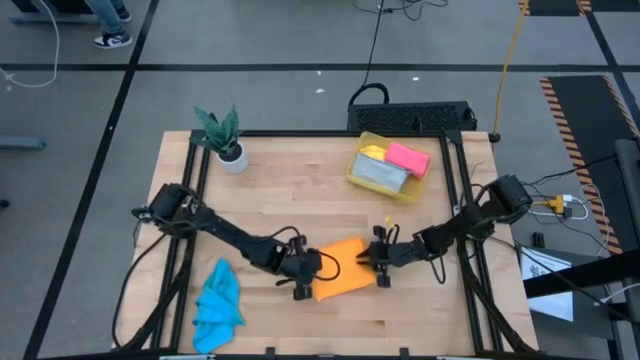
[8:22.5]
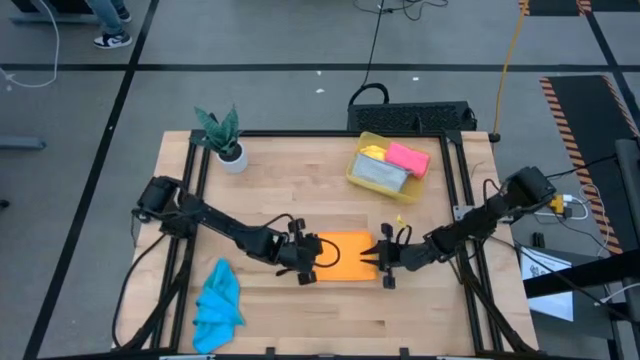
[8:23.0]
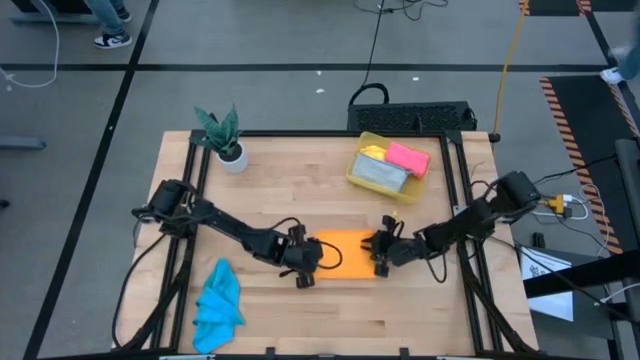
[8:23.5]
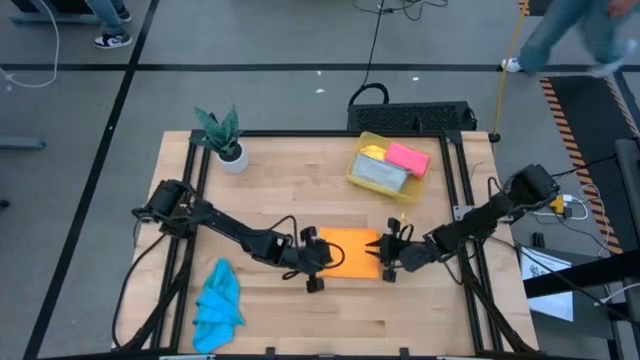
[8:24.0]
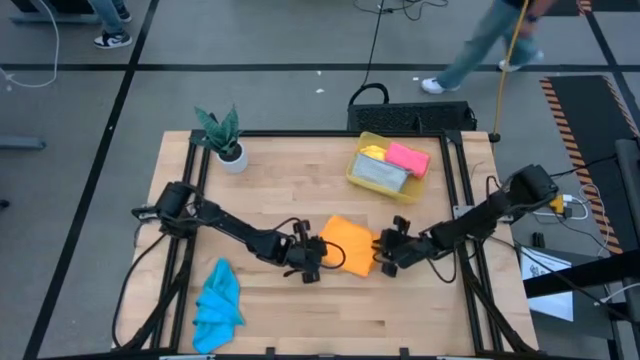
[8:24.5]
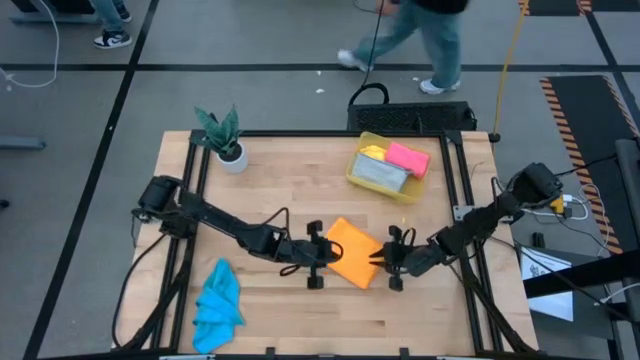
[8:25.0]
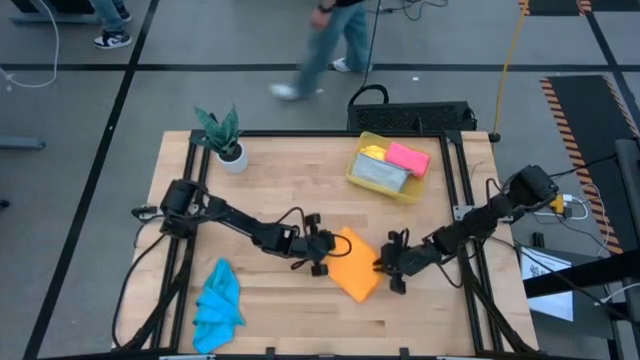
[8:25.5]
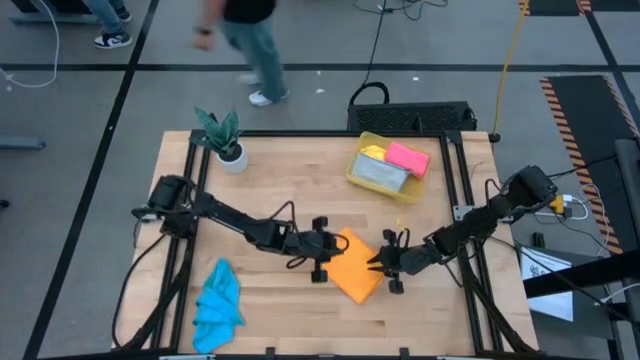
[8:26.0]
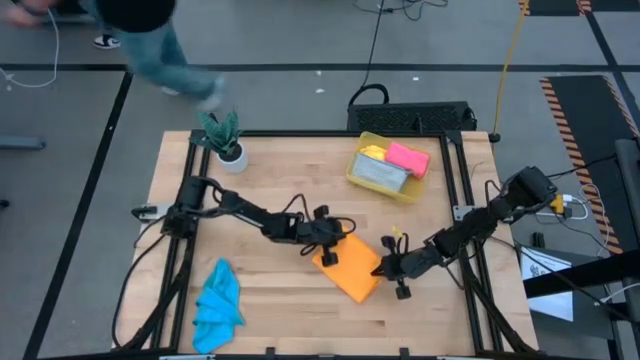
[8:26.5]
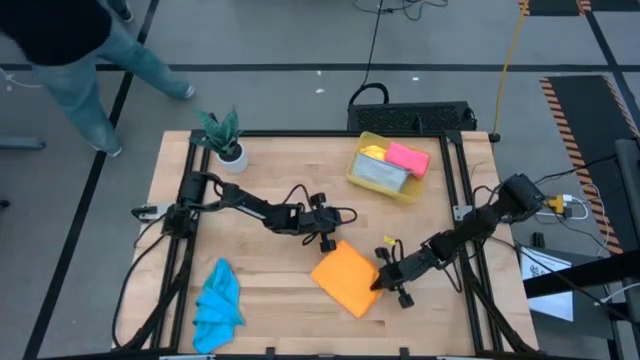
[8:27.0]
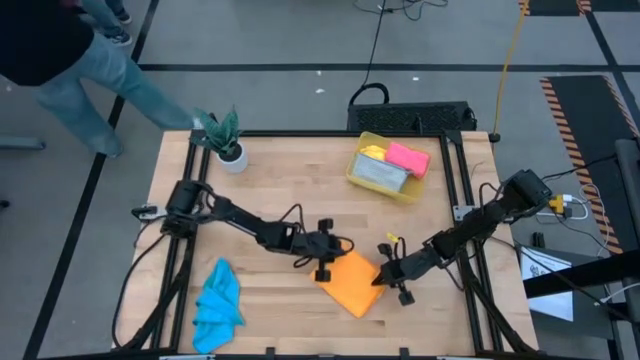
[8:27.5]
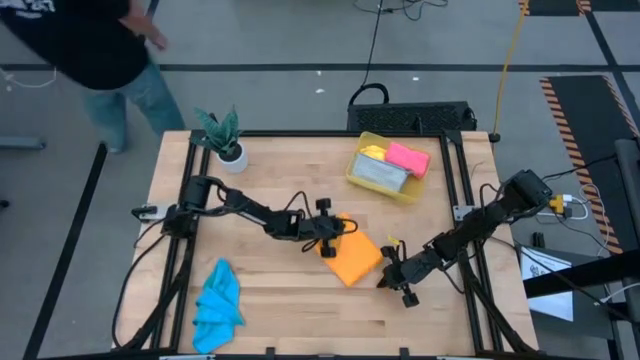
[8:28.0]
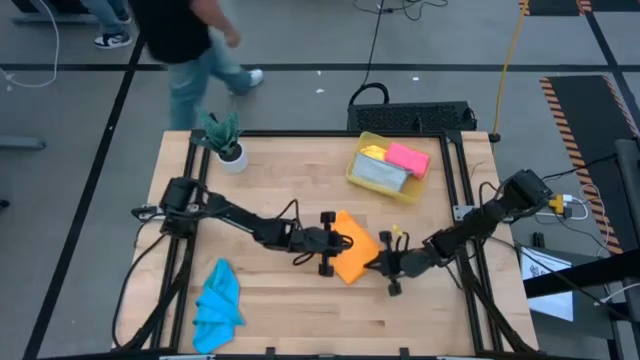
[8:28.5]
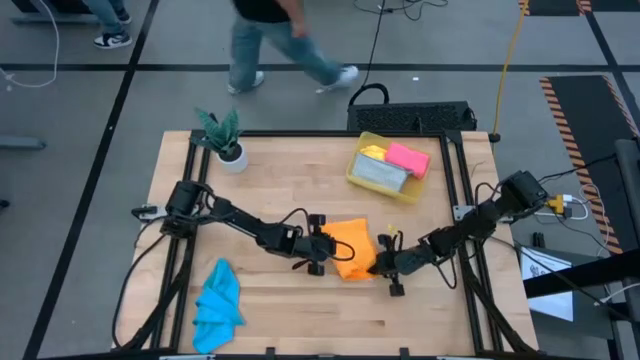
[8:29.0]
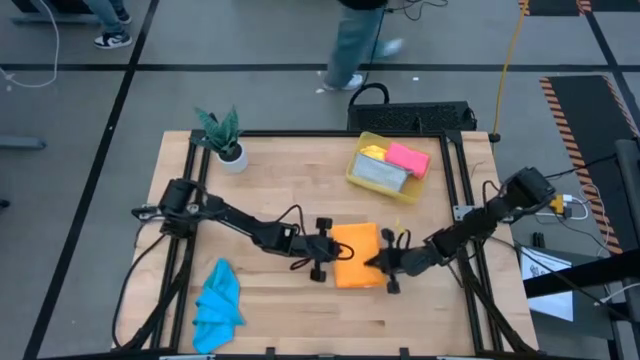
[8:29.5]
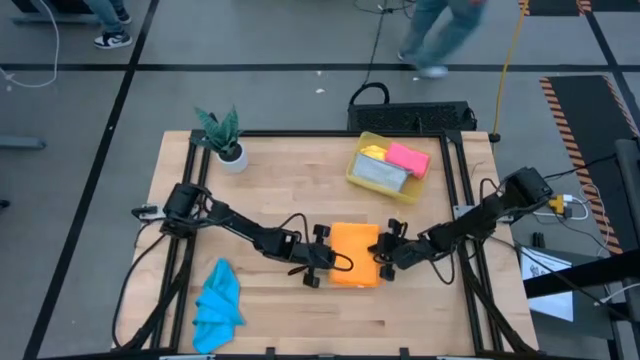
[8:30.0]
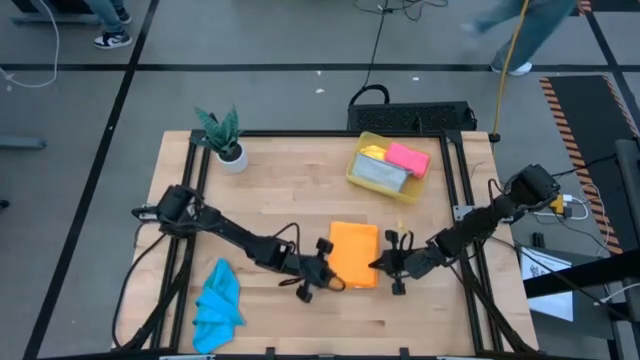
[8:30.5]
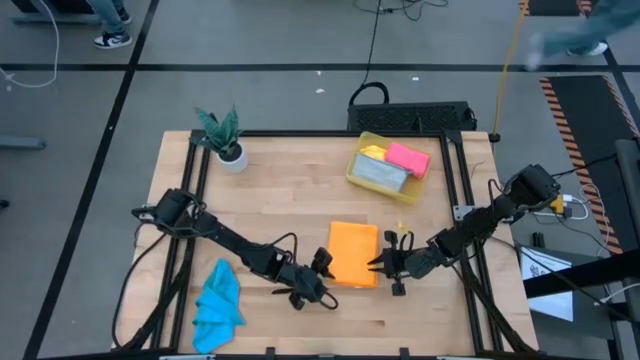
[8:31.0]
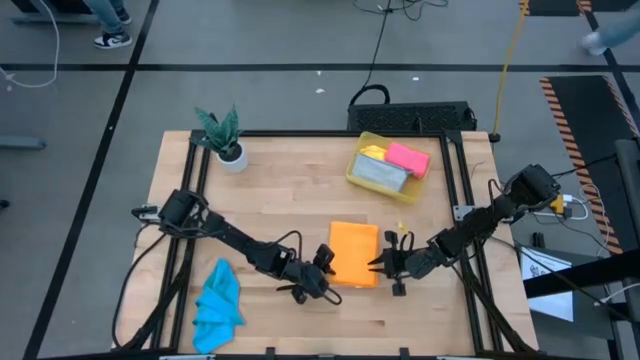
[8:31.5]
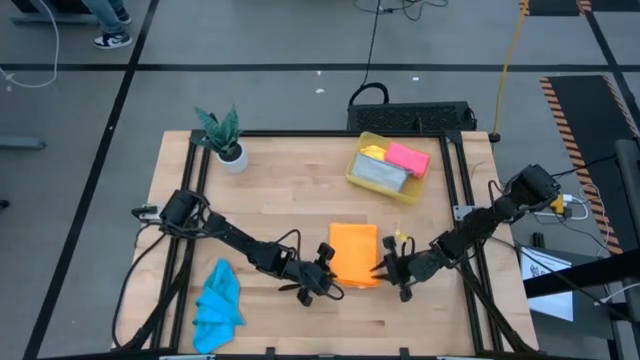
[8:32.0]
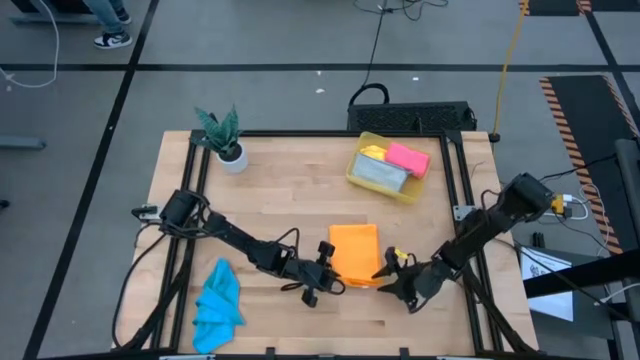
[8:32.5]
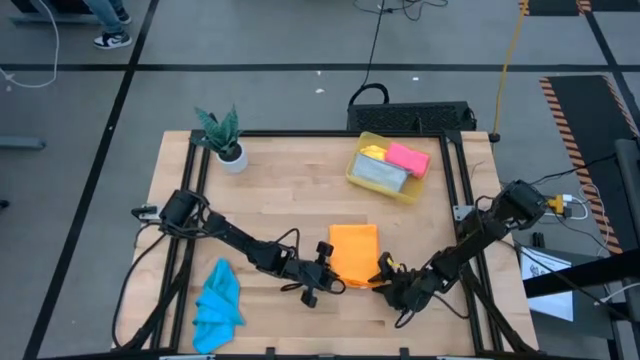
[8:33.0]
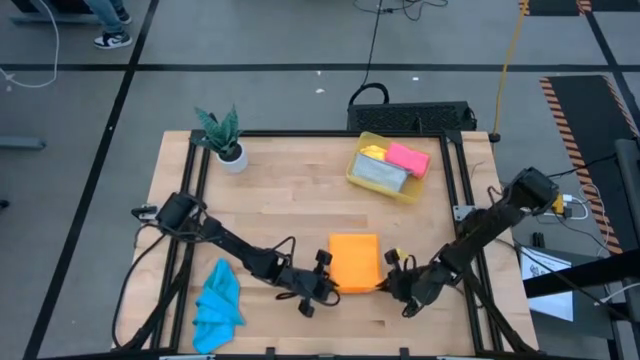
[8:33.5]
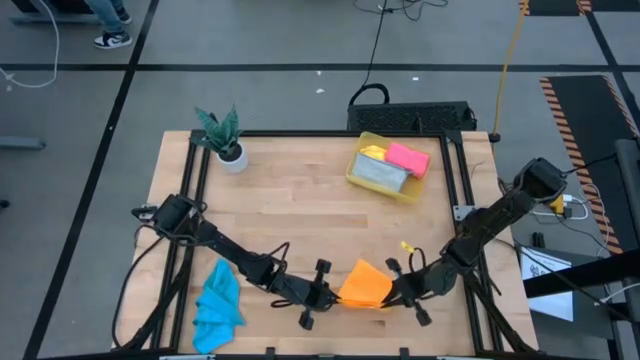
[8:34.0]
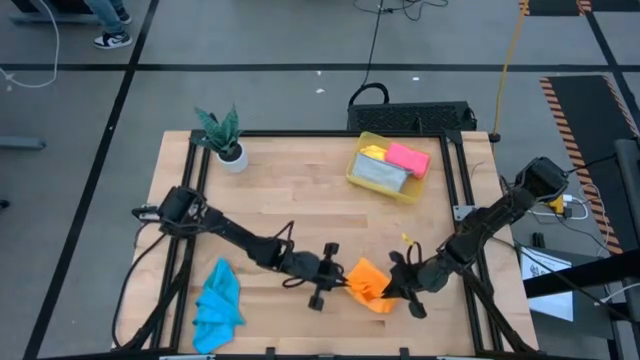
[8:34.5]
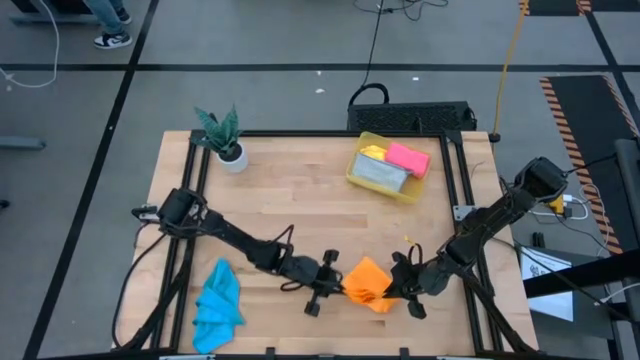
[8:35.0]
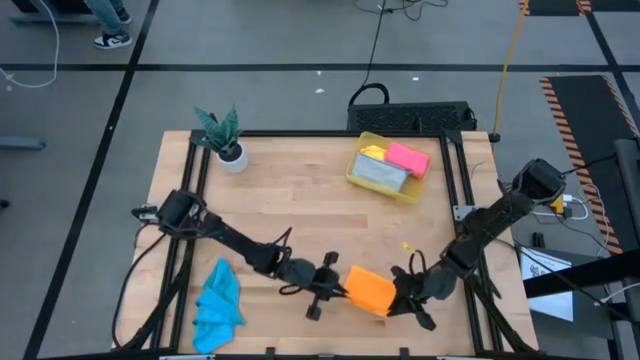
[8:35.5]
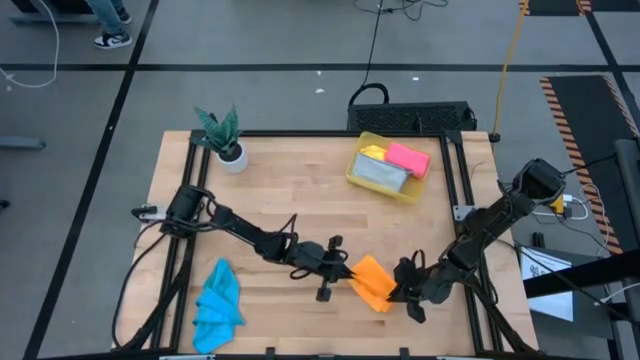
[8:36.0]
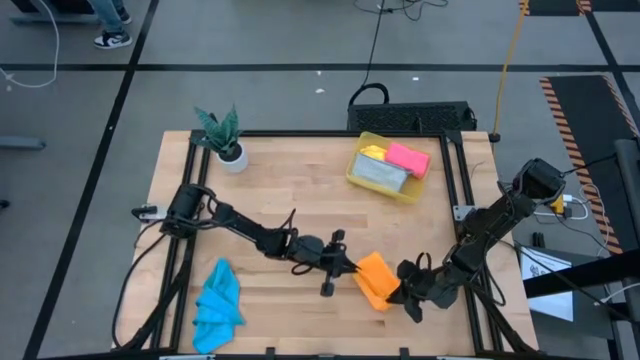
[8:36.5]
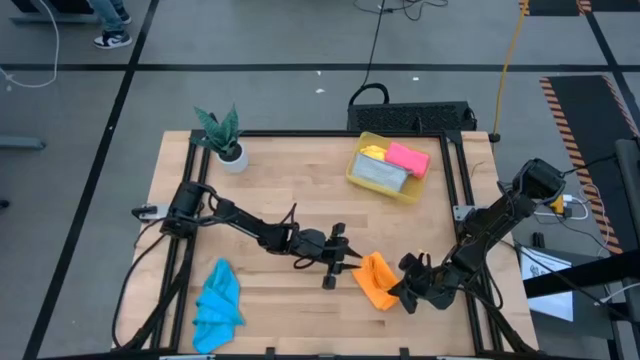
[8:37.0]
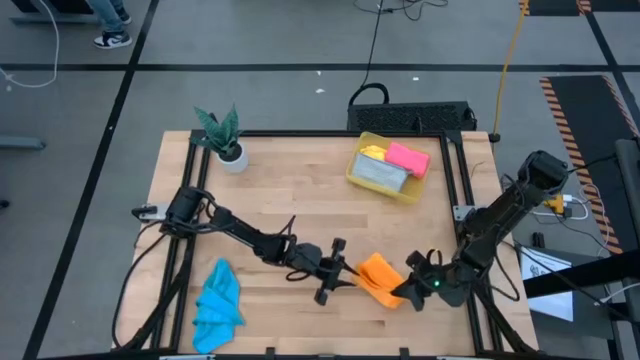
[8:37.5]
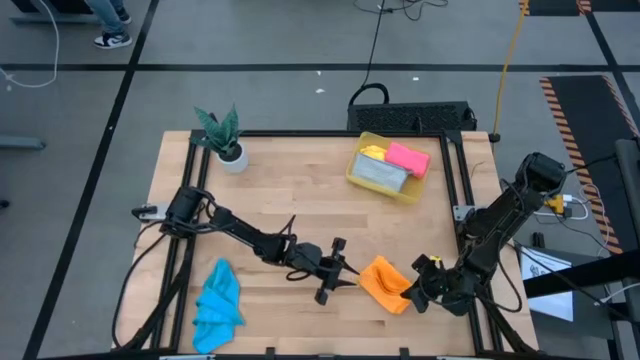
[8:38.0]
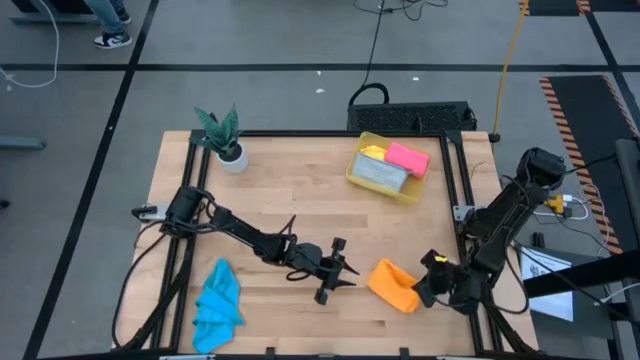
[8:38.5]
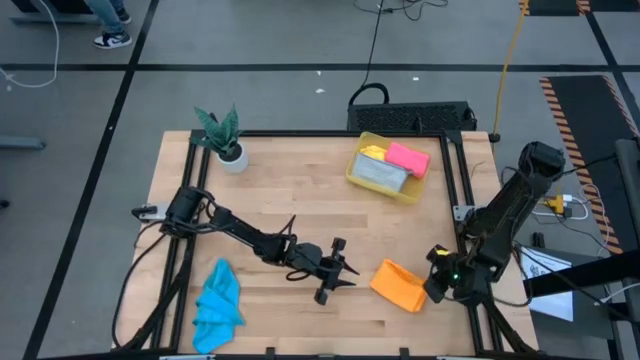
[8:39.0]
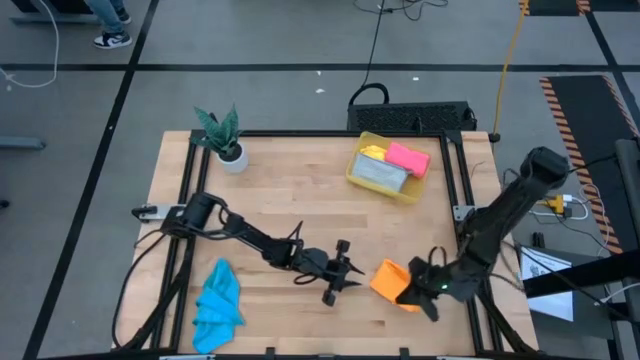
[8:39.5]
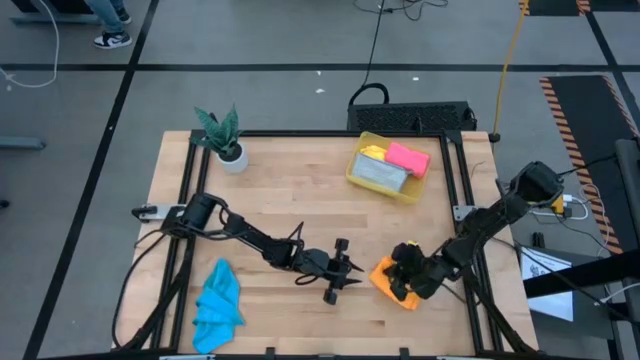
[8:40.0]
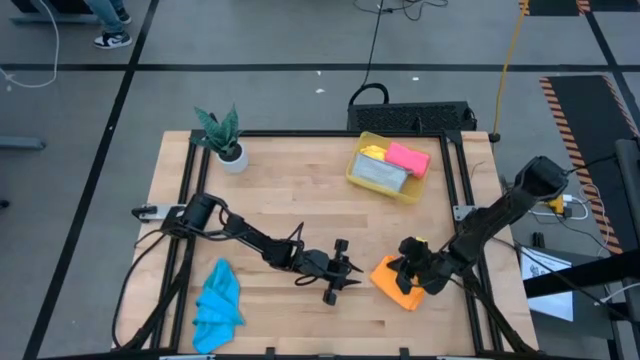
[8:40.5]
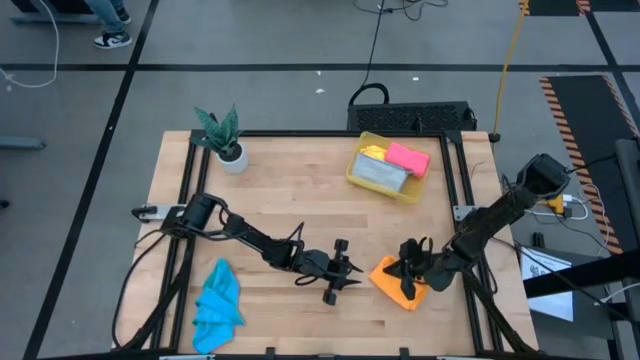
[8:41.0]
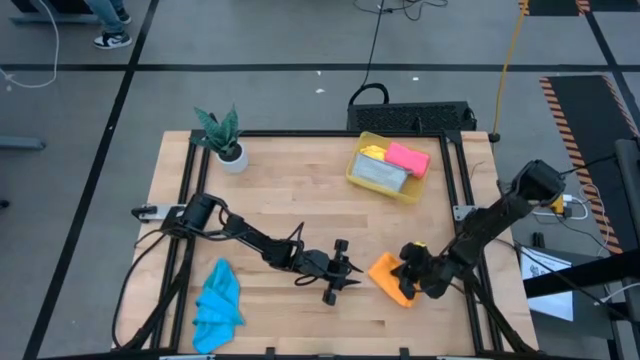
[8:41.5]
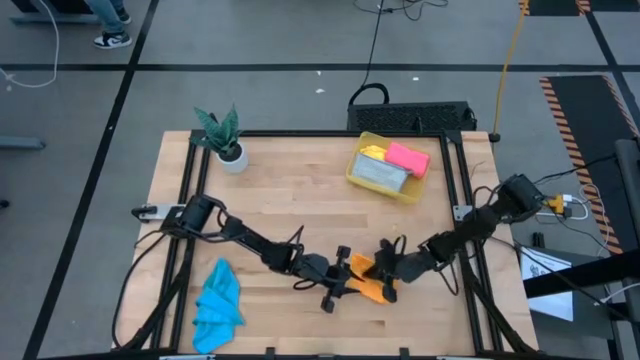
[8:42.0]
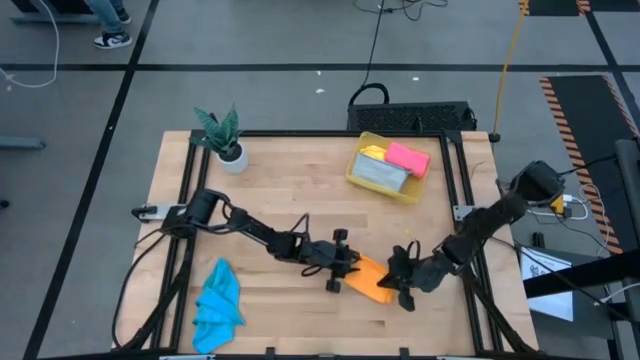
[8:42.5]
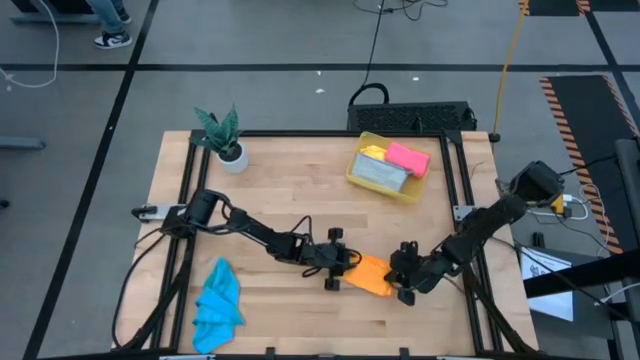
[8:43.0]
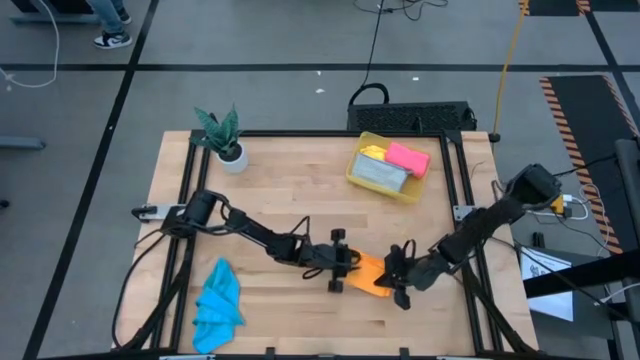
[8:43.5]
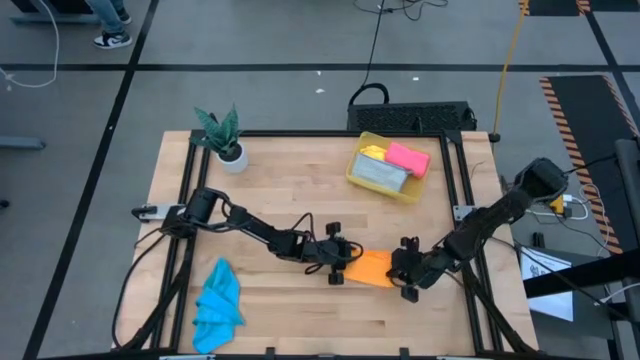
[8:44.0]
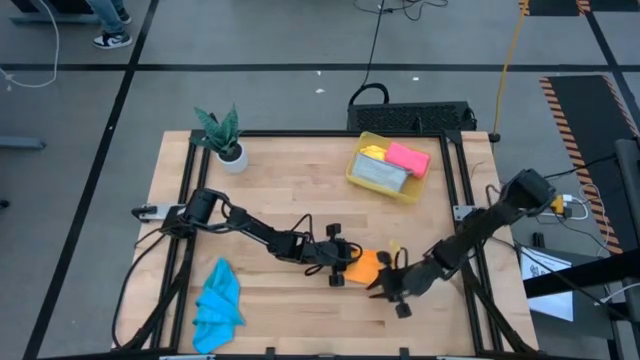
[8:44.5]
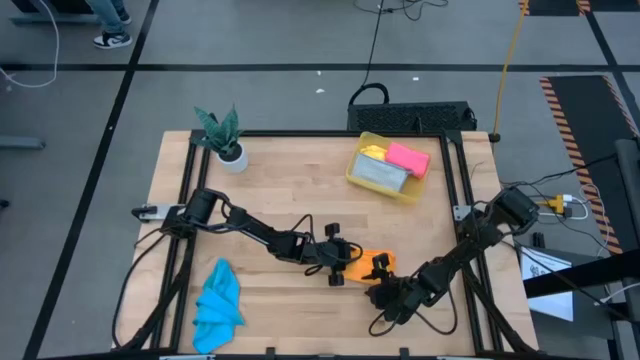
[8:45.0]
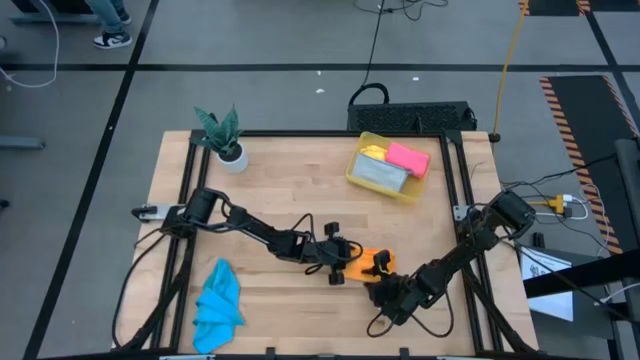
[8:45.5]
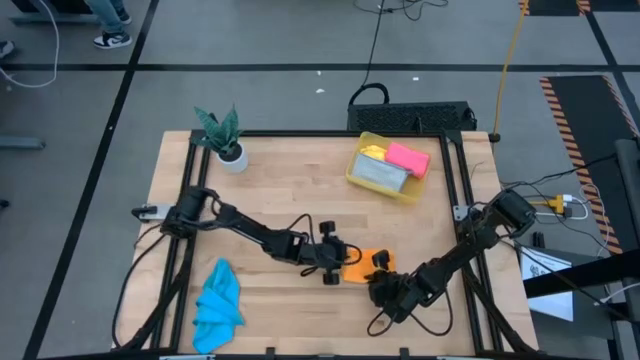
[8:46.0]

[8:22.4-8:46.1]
Task: Fold microfiber towels
Fold the orange kitchen towel
